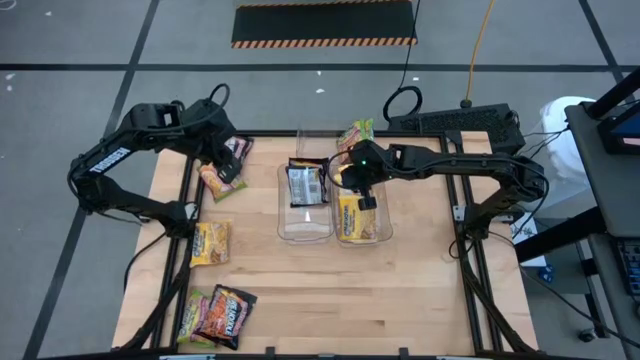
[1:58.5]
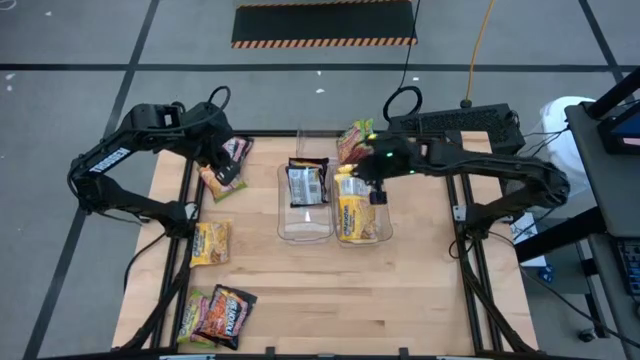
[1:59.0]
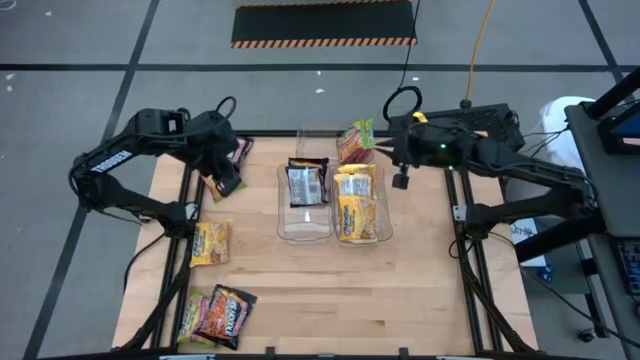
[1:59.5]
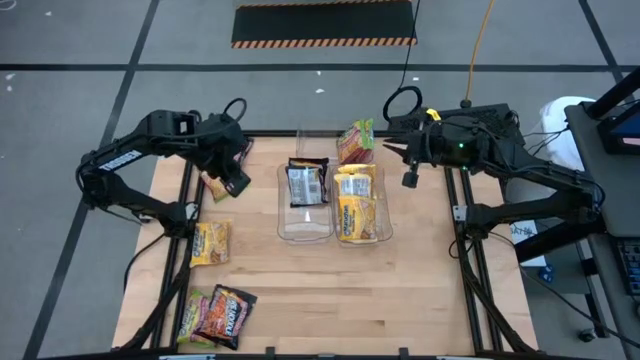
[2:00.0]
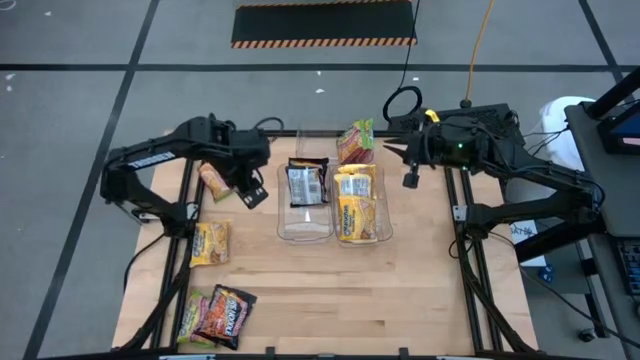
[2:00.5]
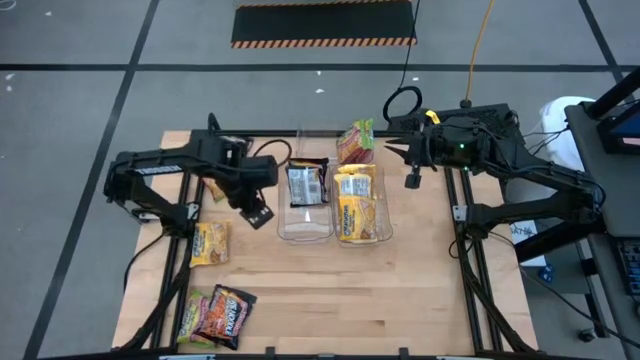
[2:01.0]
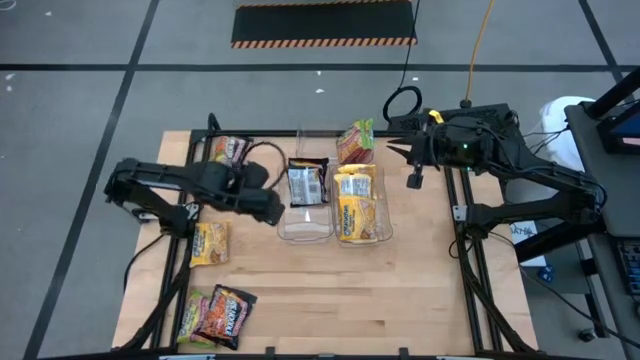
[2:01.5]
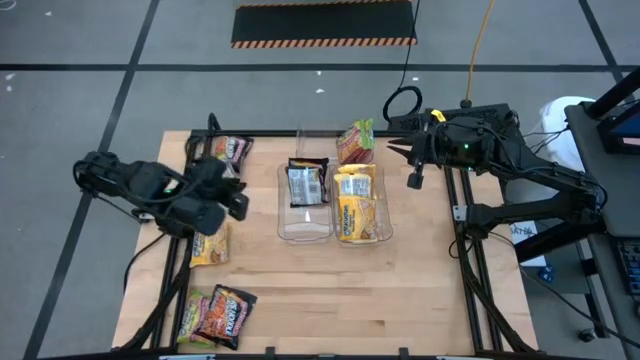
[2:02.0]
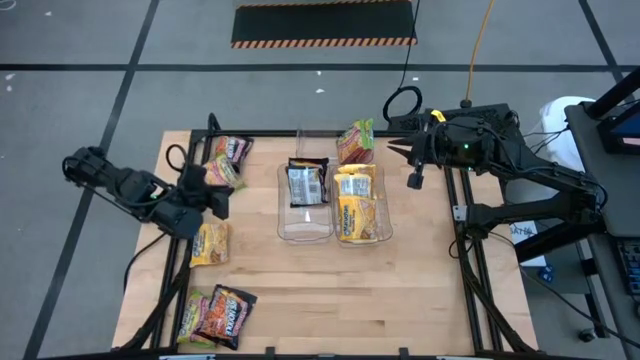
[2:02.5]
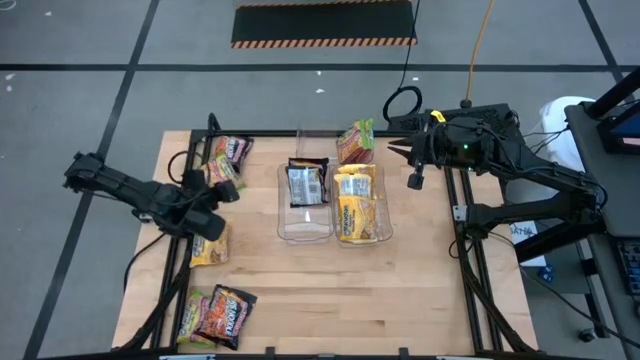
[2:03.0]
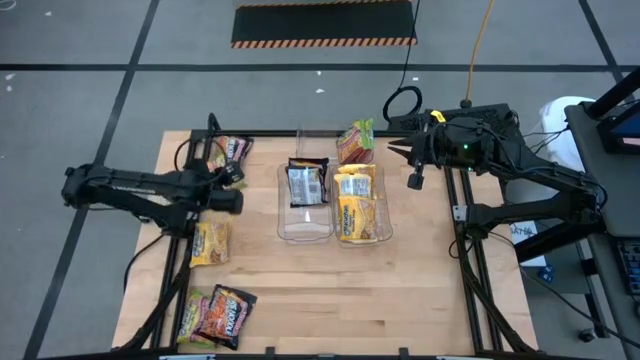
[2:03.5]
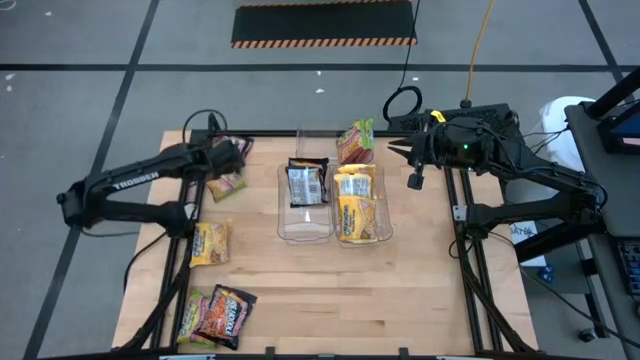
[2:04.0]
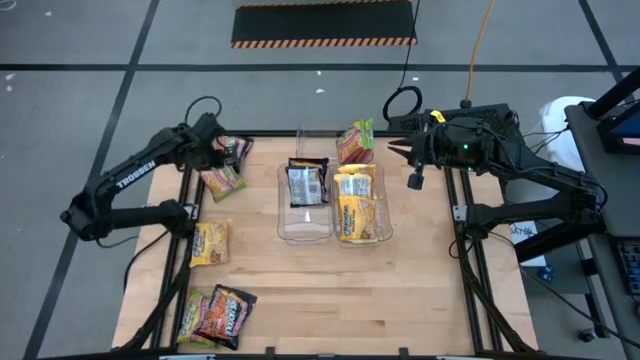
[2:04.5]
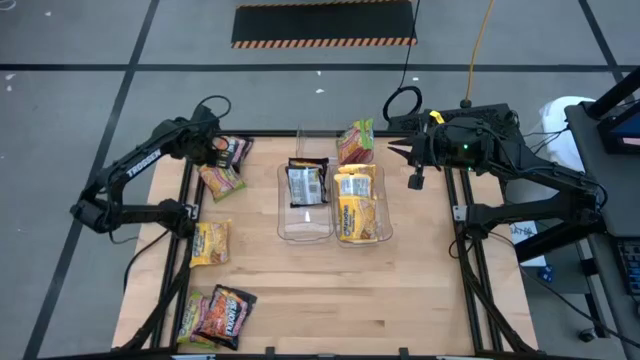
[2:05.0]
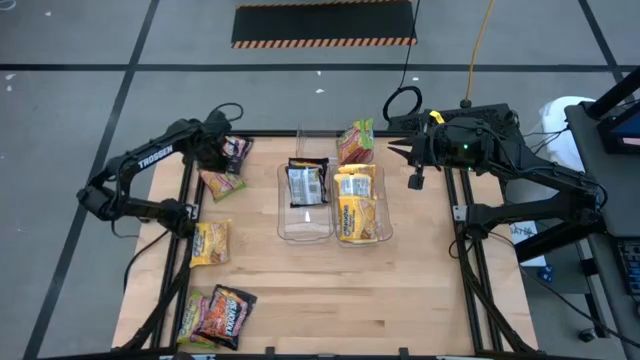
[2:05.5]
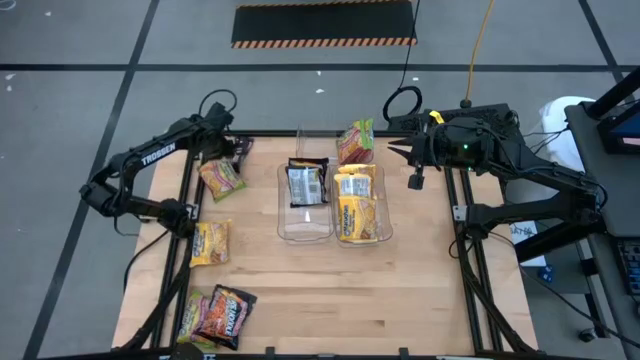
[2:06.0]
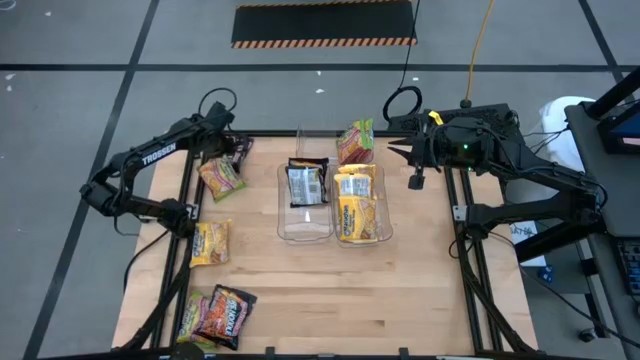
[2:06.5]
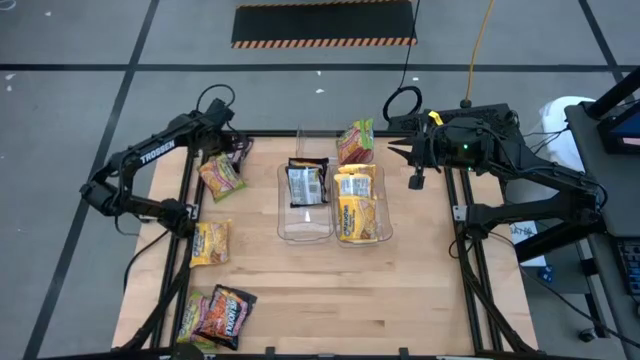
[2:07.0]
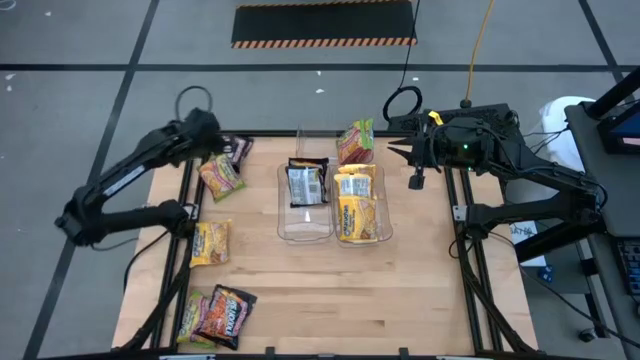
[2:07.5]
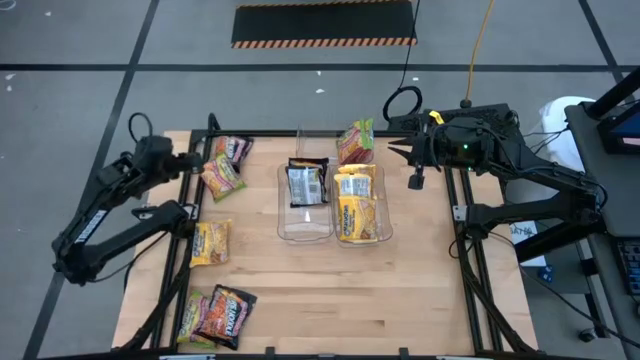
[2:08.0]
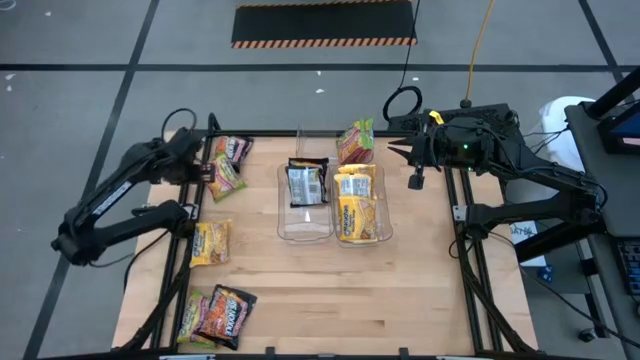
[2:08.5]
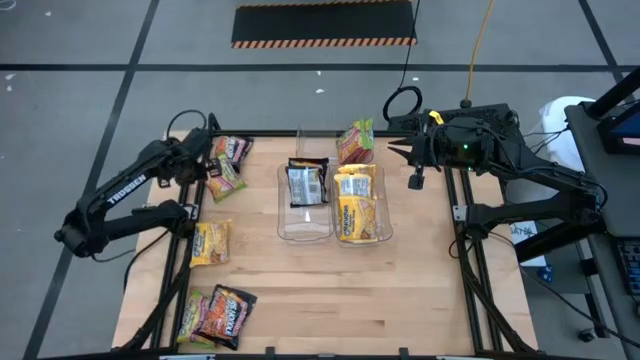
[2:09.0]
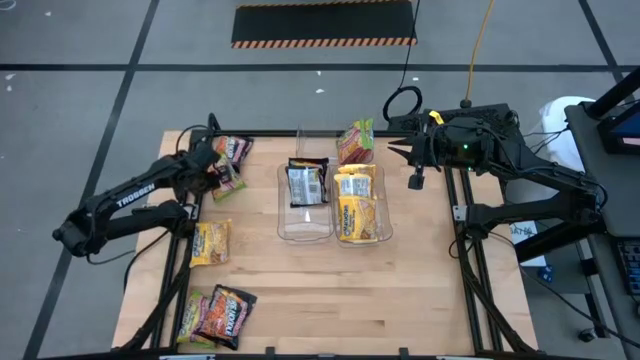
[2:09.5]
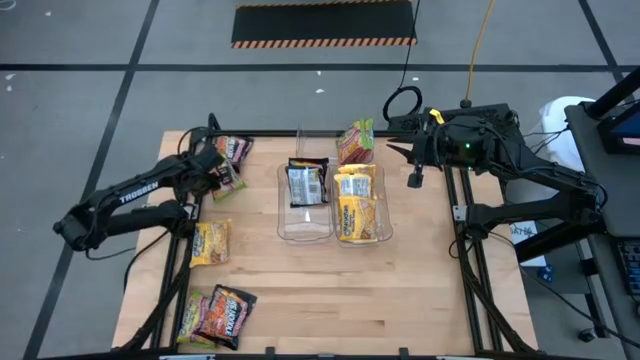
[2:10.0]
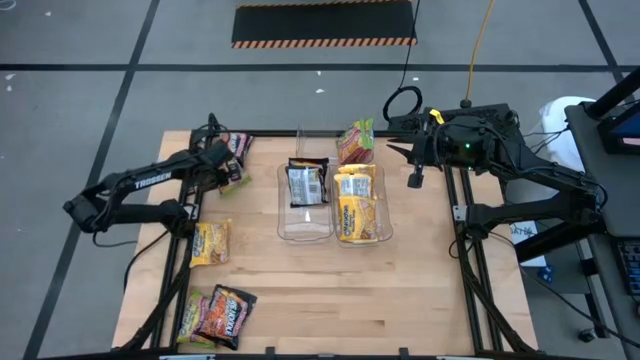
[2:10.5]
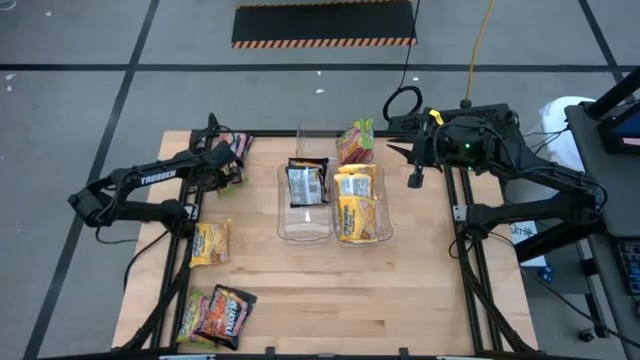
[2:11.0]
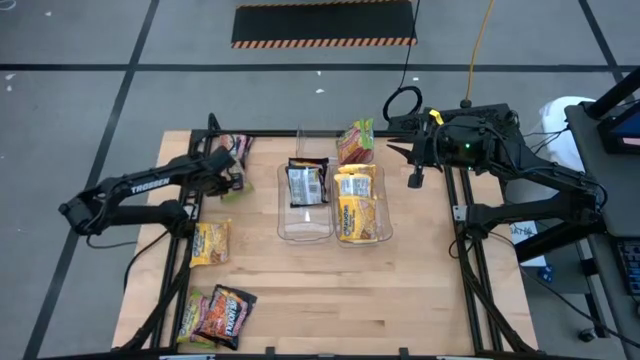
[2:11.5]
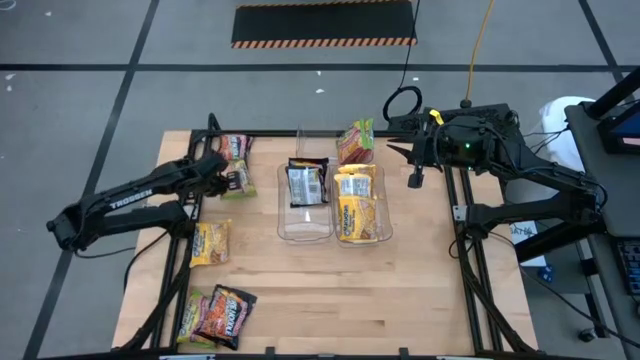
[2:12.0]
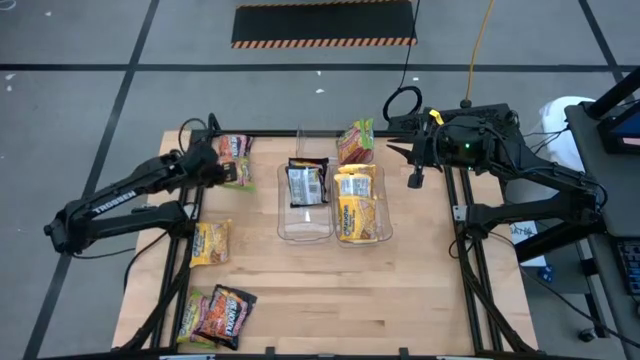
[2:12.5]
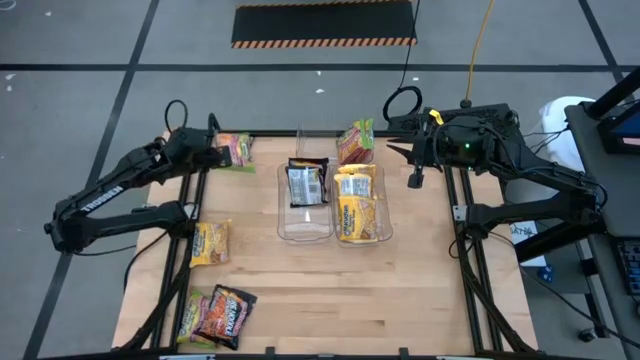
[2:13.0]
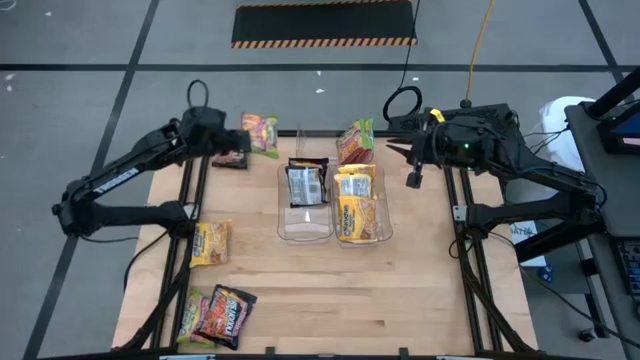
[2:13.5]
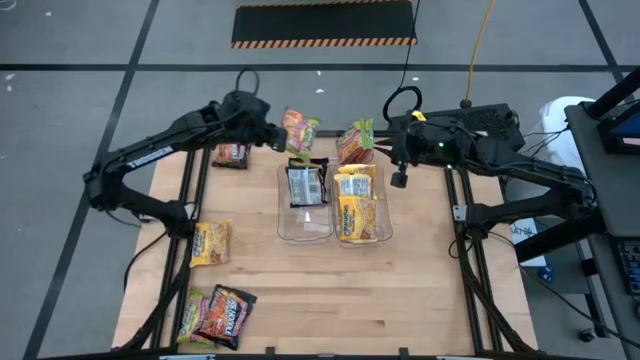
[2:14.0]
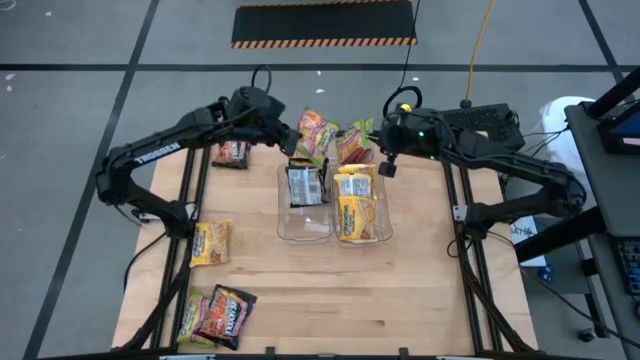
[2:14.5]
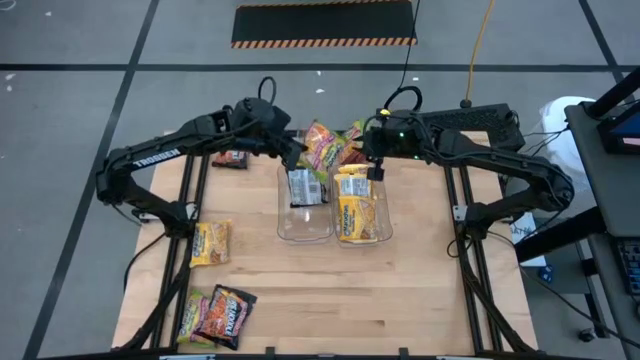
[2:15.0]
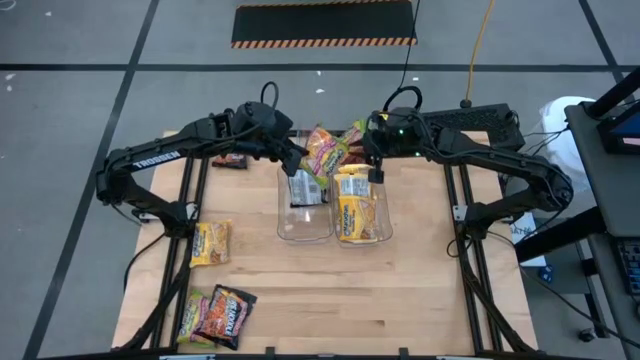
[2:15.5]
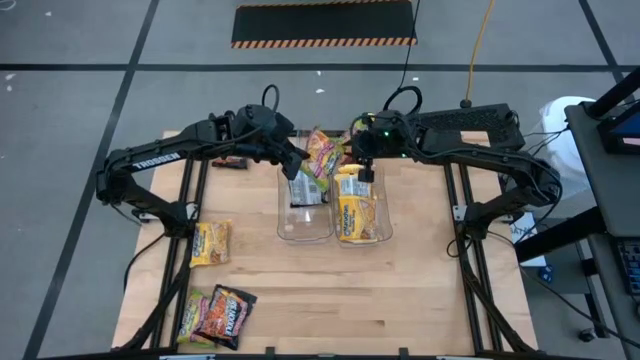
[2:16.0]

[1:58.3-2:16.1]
Task: Sort Maruchan noodles
Put the green noodle pack into the top transparent bin

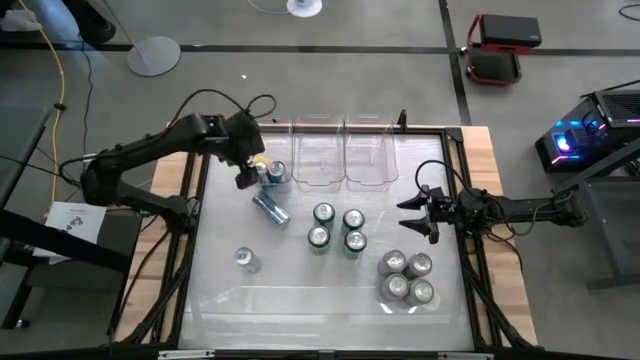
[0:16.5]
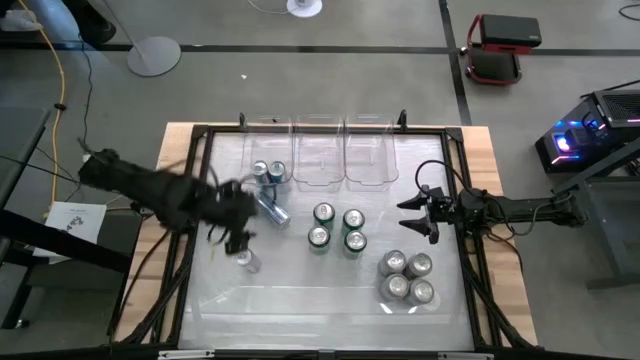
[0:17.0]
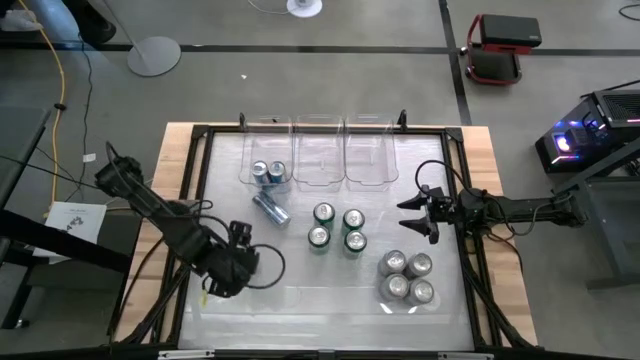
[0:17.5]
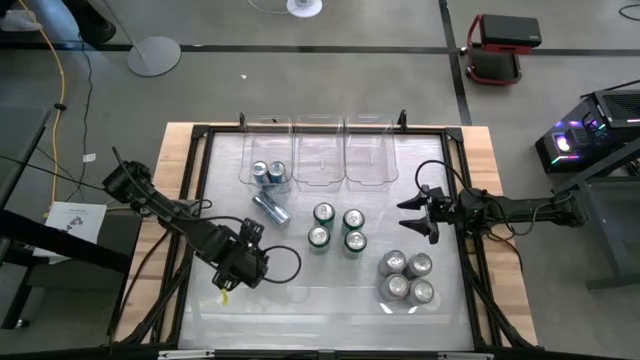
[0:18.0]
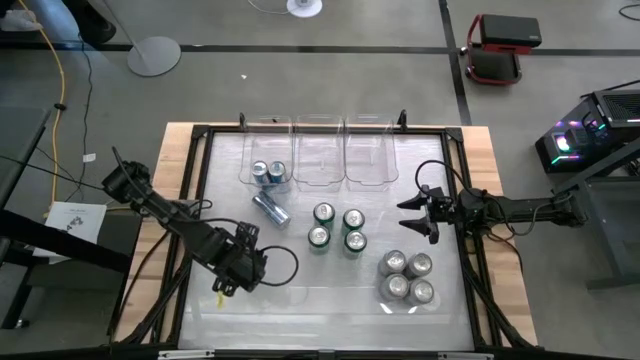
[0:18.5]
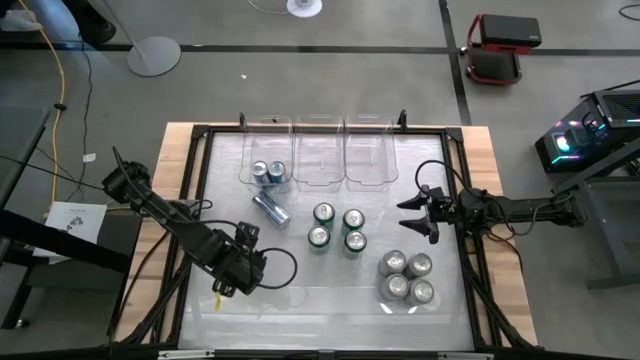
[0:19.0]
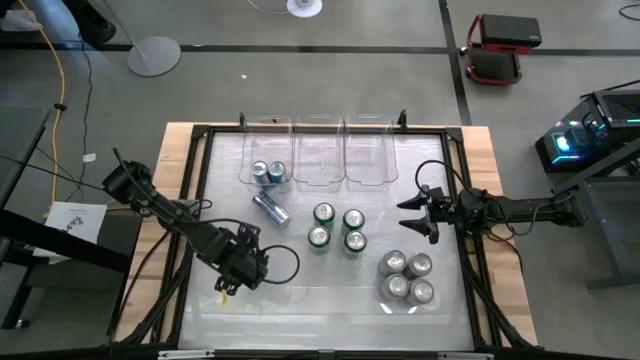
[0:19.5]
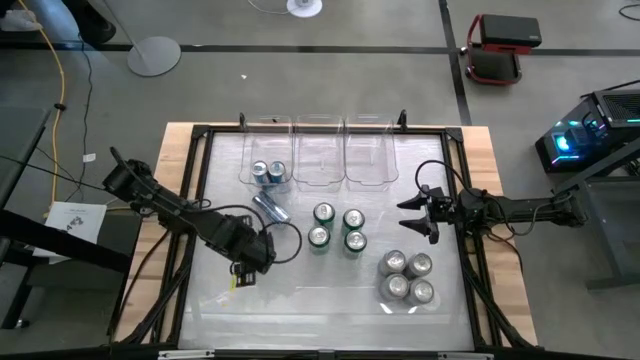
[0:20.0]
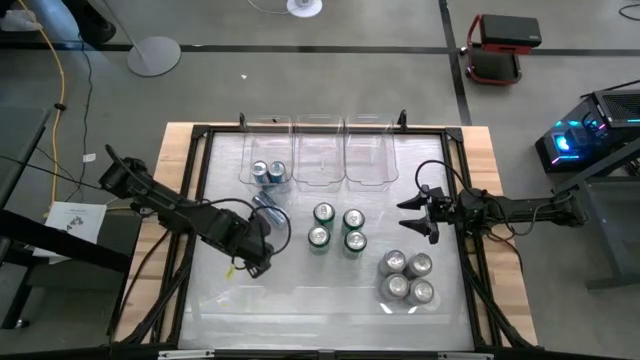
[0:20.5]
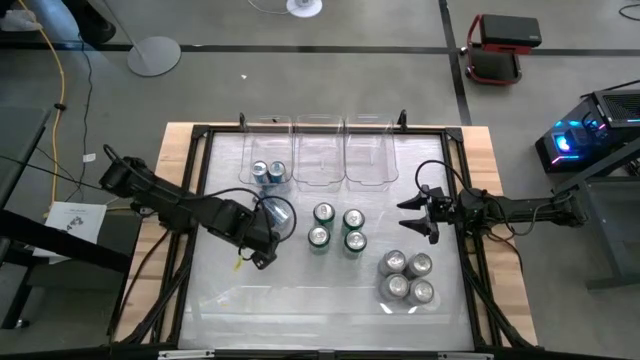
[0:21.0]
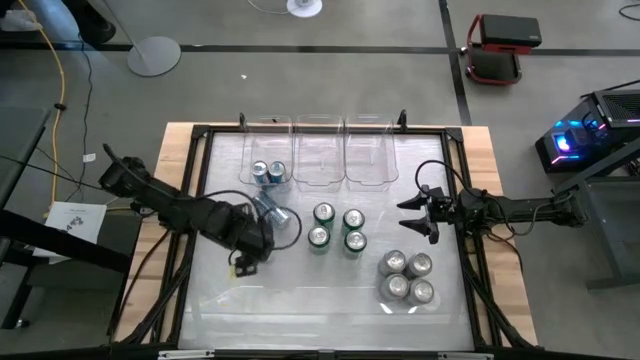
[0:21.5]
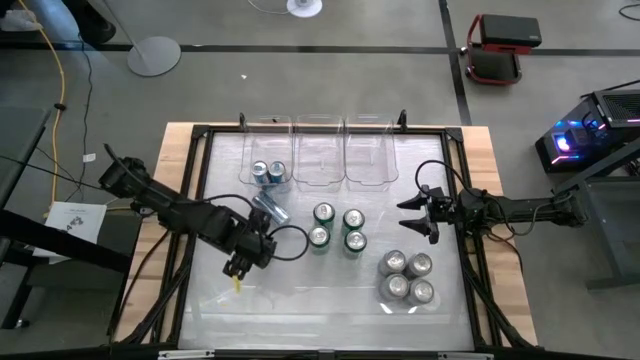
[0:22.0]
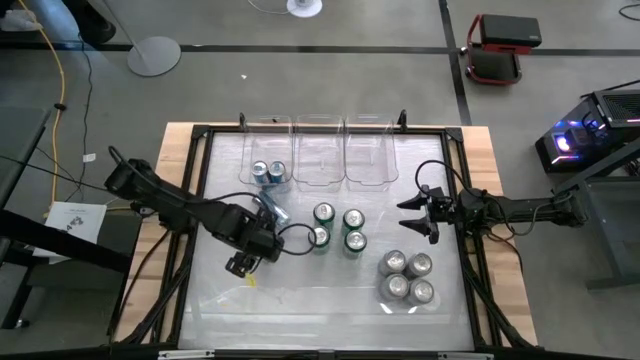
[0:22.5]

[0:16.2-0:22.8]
Task: Sort soda cans
Put the bottom blue soda can into the left transparent bin
